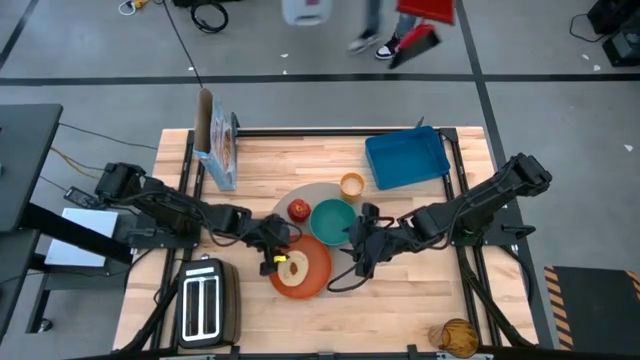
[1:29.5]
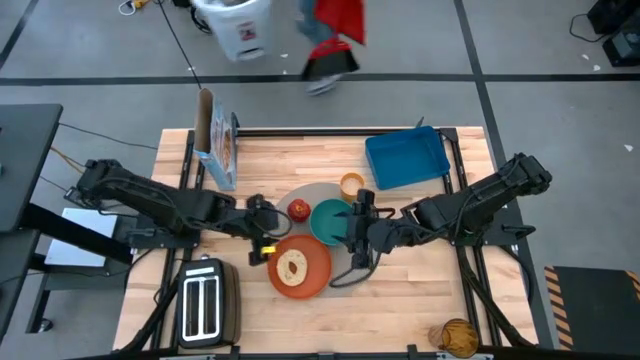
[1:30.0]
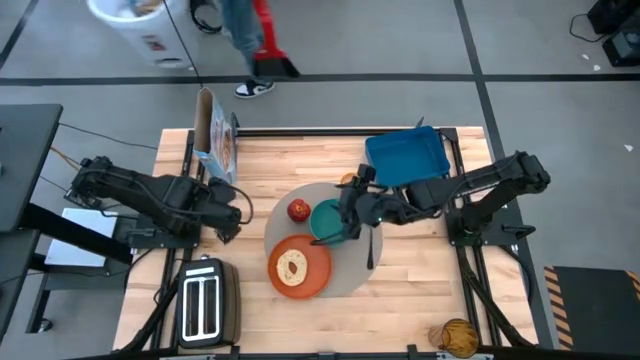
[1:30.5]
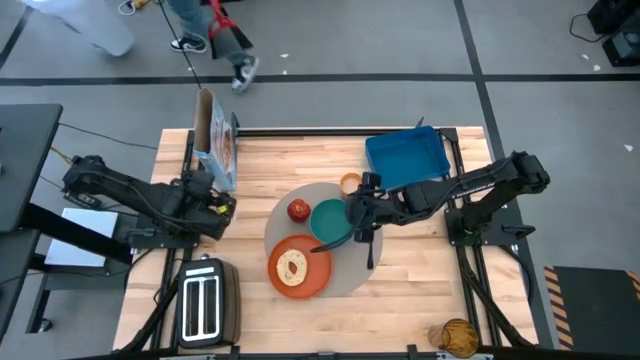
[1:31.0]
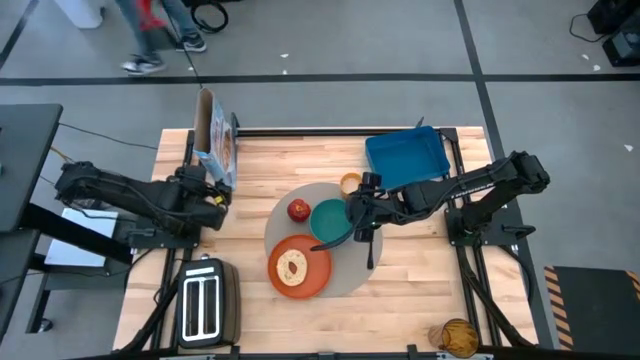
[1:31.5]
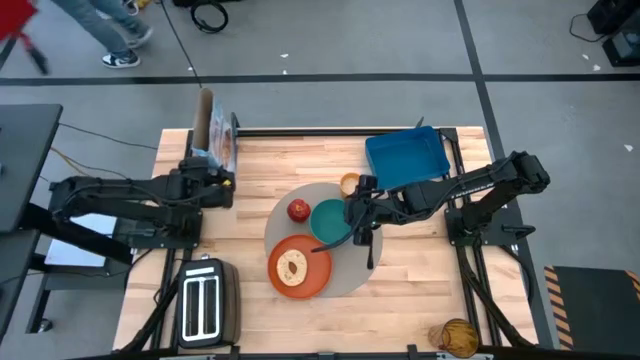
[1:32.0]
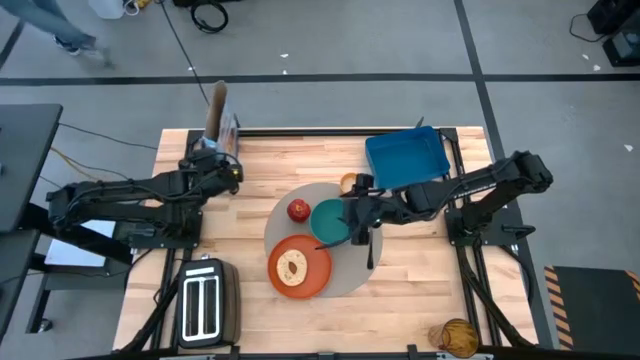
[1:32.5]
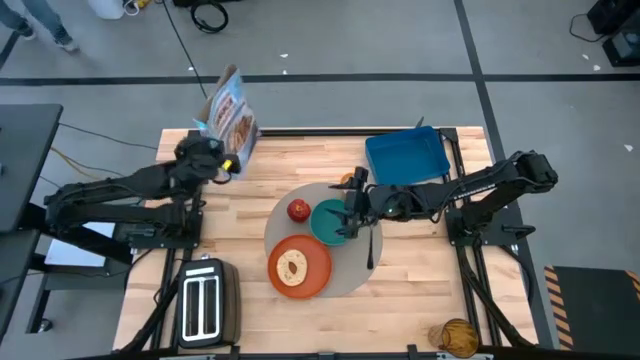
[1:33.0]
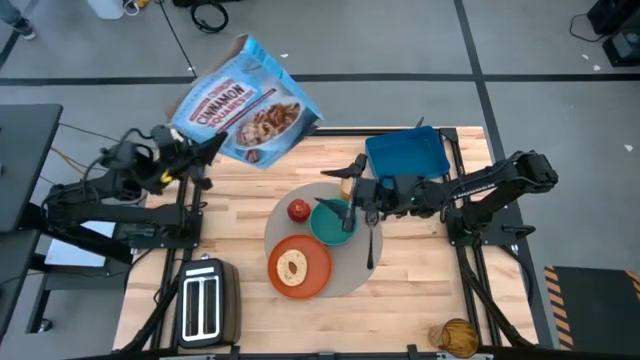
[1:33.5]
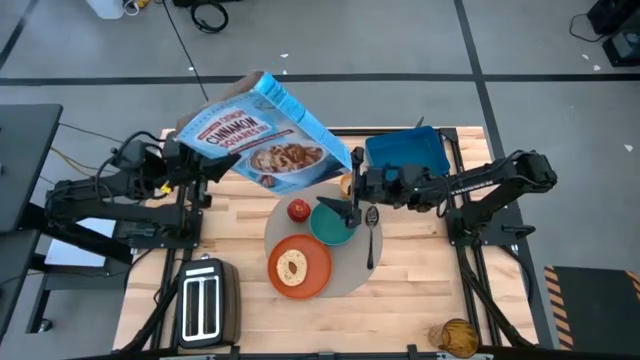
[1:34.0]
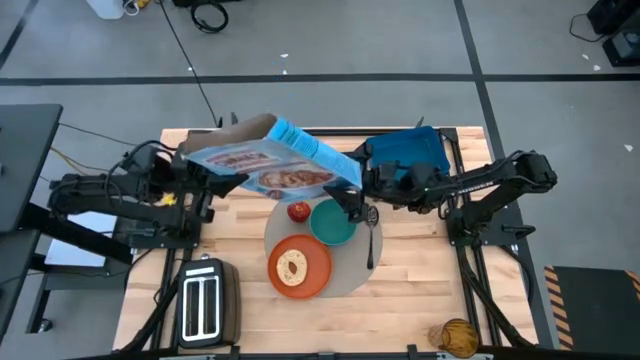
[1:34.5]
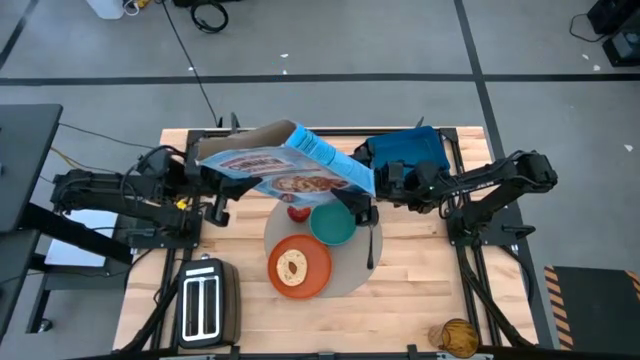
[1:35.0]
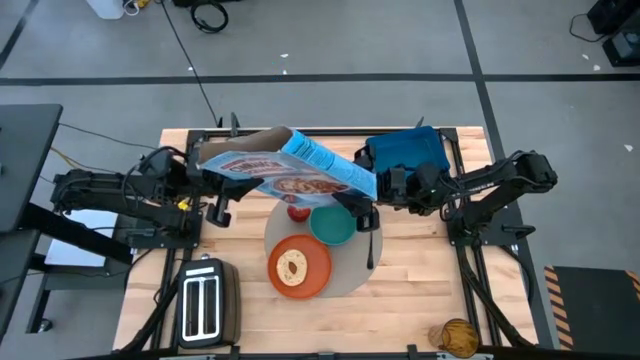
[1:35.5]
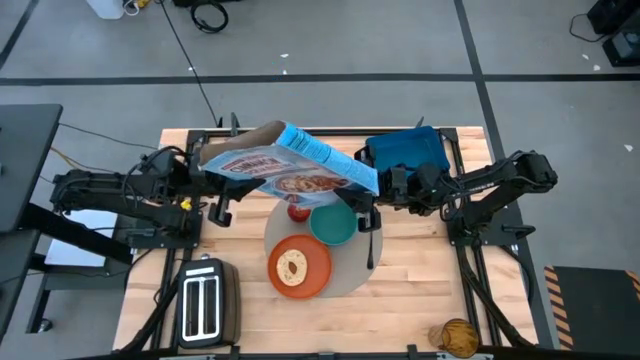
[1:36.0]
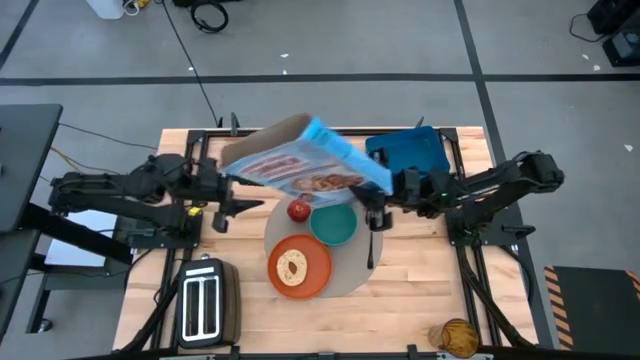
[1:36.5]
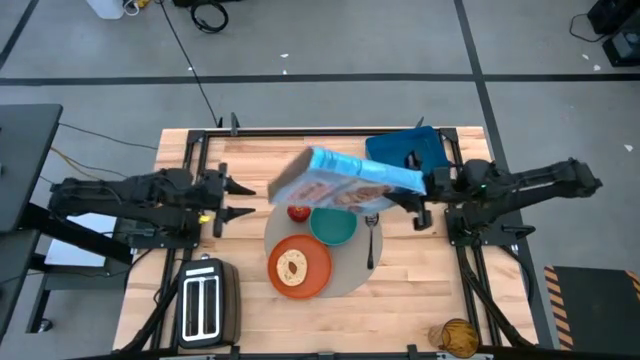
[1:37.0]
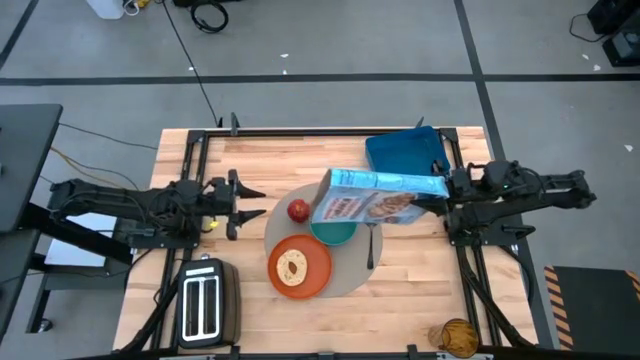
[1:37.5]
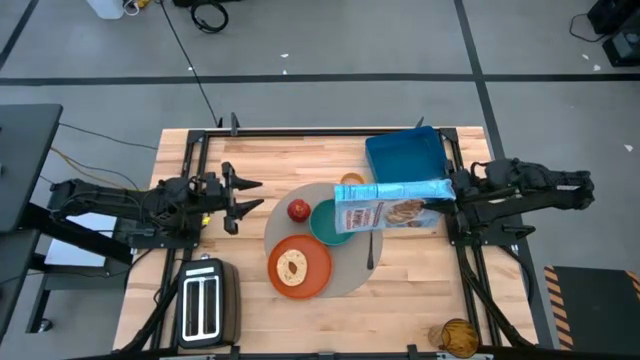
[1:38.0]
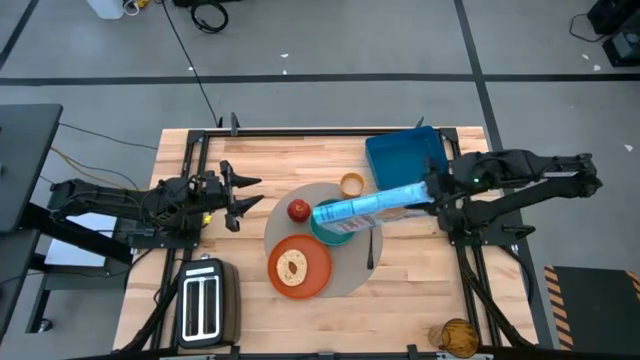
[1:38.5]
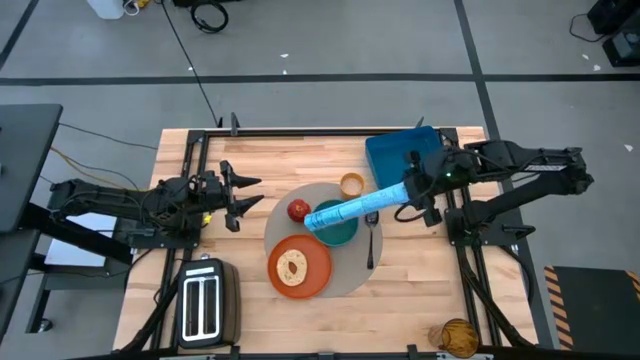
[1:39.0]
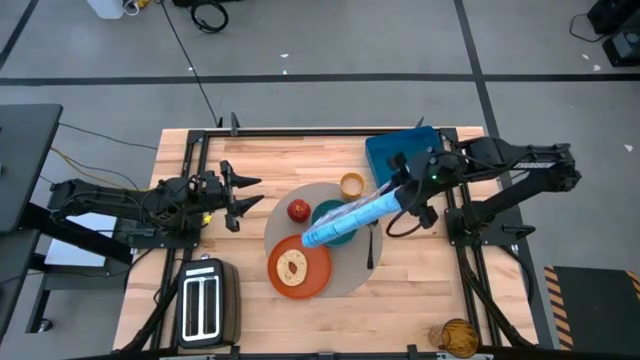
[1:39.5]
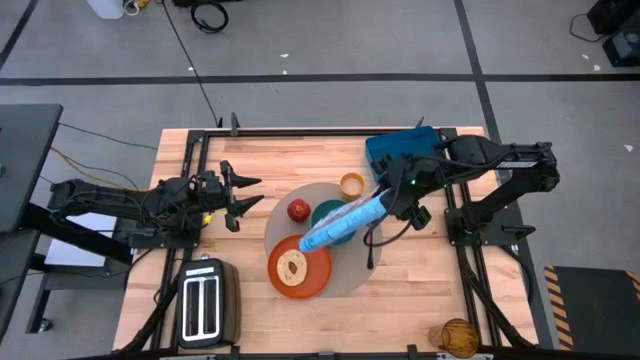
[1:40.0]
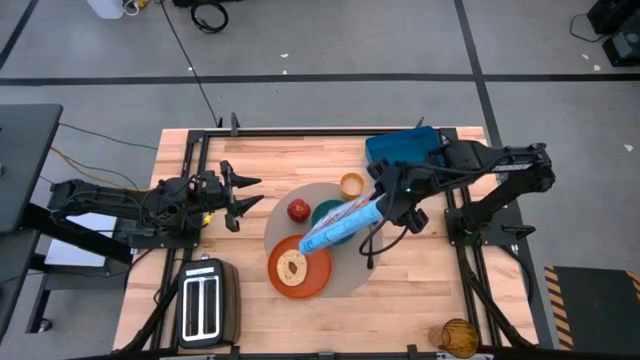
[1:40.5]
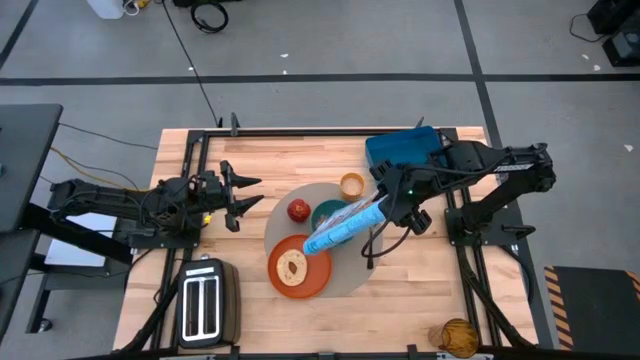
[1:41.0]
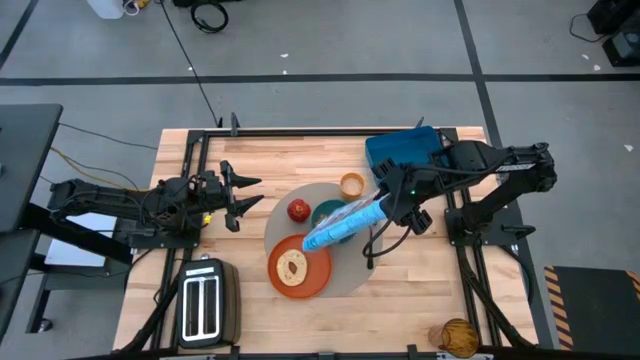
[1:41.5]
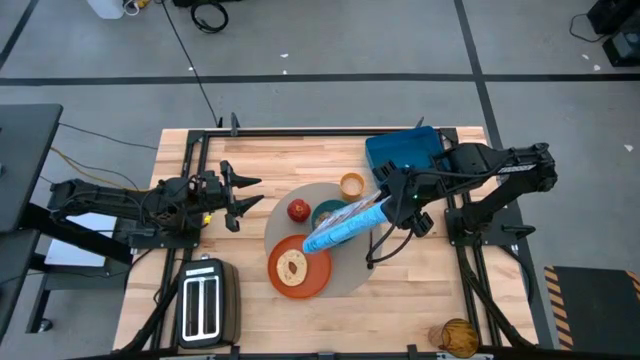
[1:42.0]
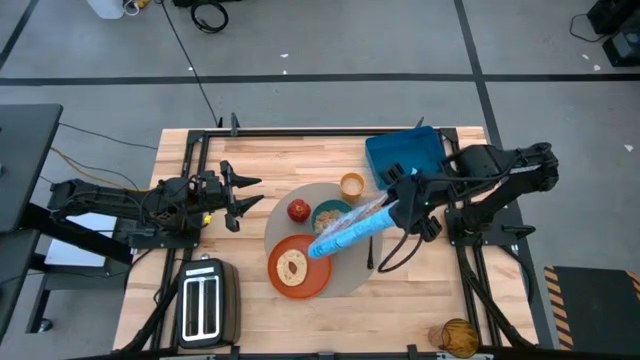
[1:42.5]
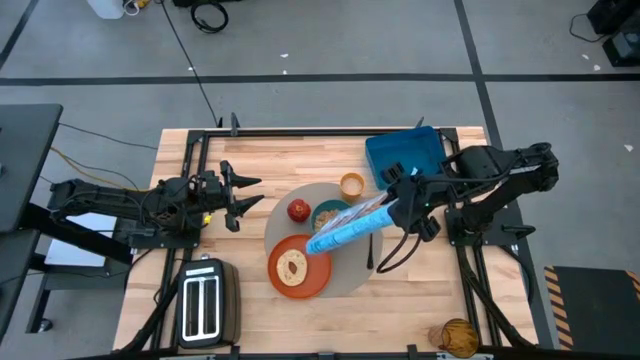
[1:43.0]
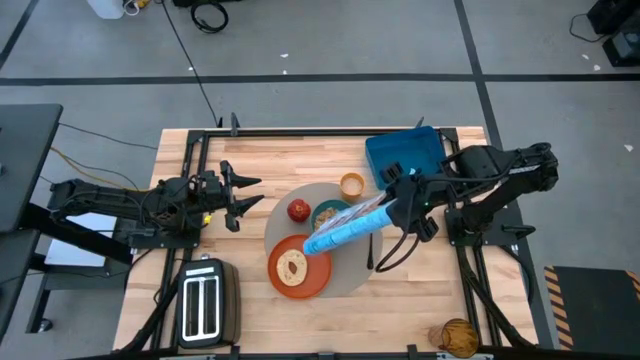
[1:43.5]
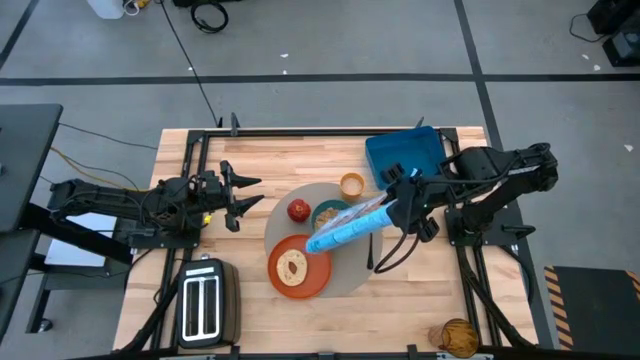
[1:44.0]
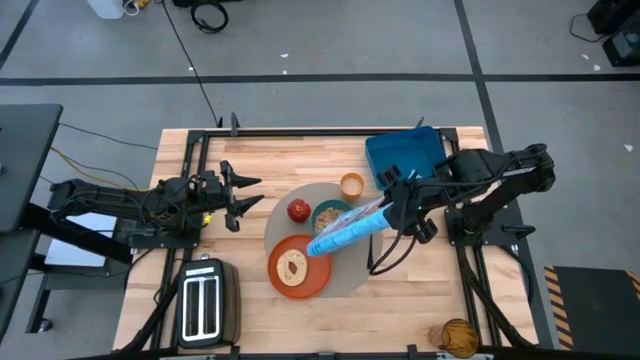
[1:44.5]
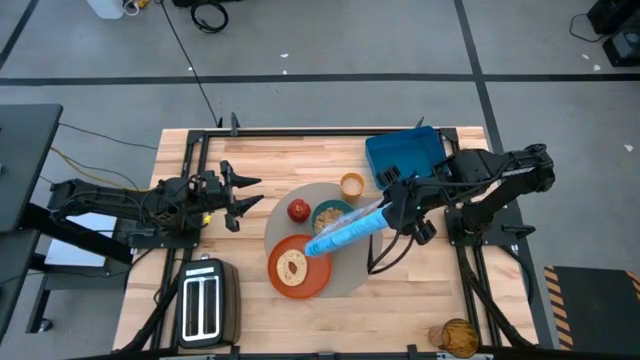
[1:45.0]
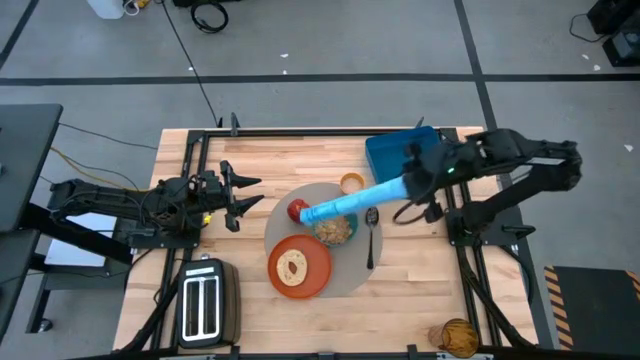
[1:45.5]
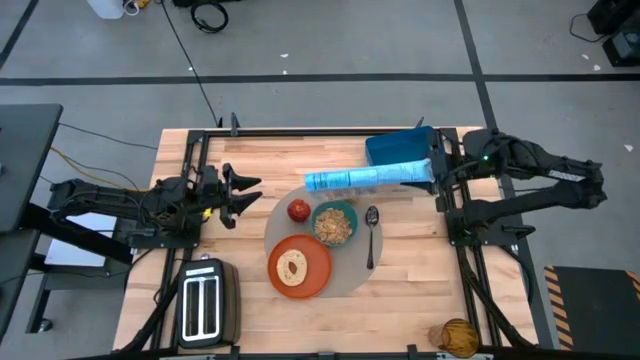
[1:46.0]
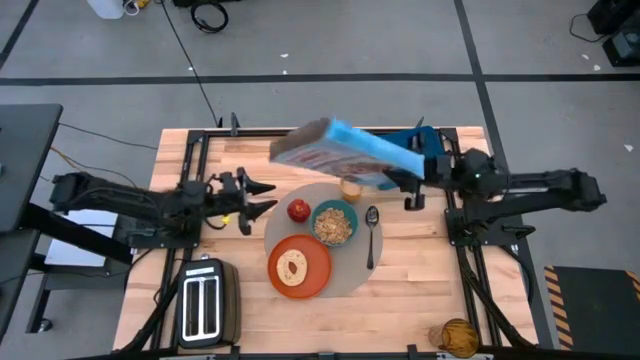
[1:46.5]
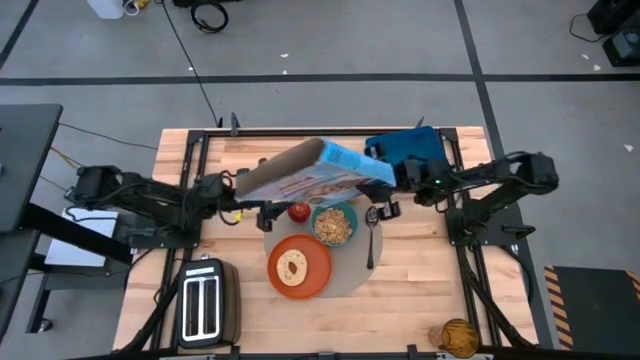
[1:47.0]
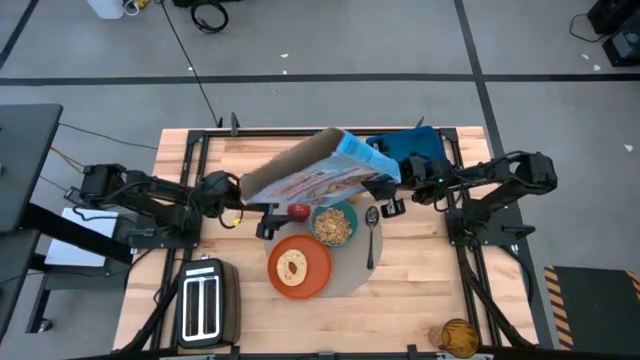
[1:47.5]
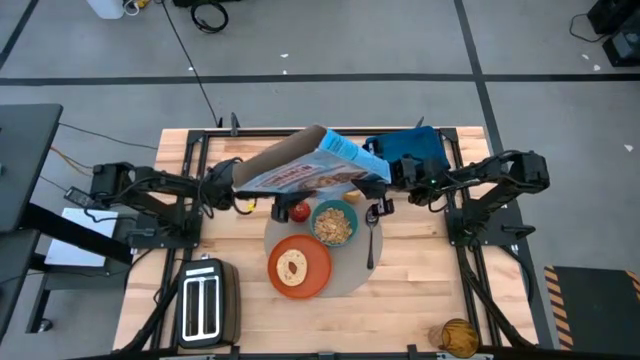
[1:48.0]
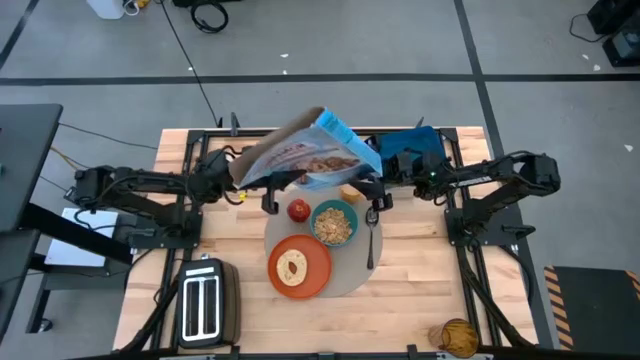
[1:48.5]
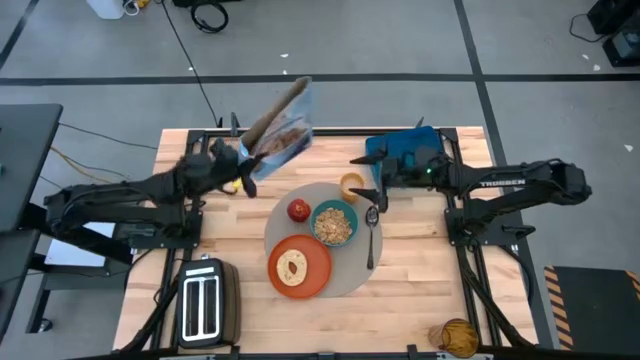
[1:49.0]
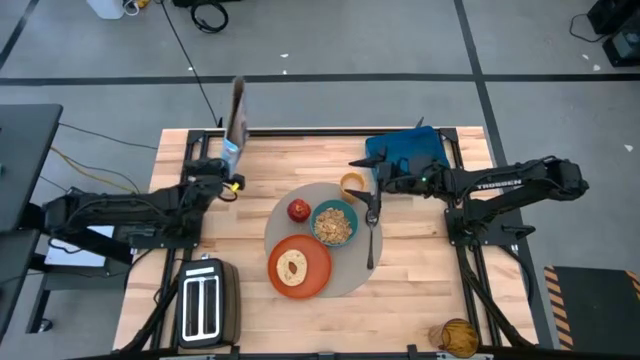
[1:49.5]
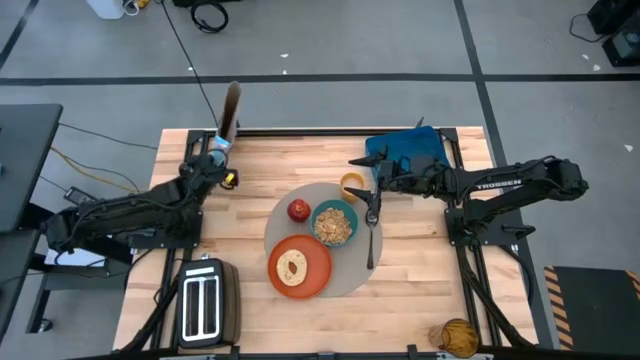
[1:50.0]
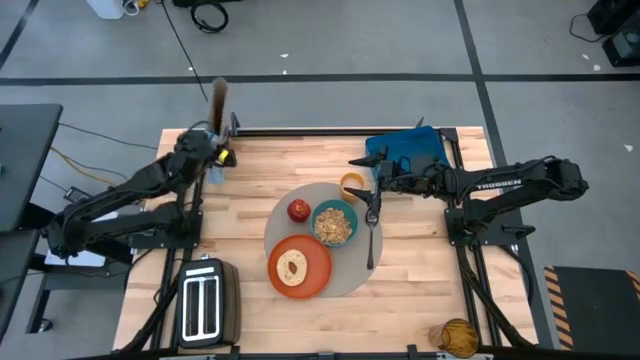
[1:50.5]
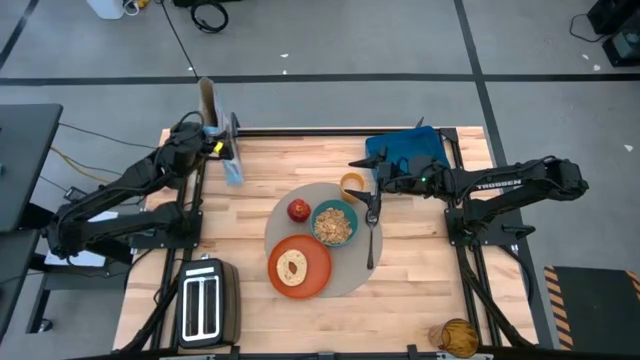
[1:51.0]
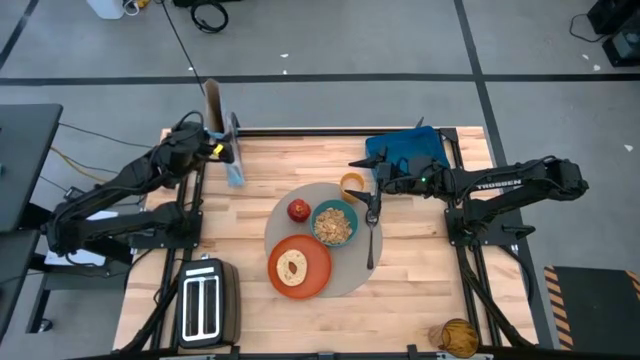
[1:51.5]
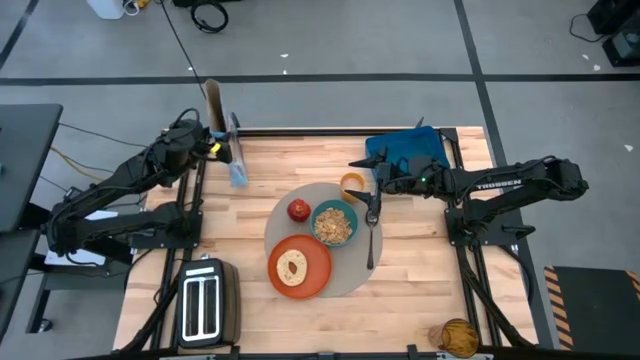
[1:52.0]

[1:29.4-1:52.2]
Task: Arrange a breakfast setting
Pour the cereal into the blue bowl
